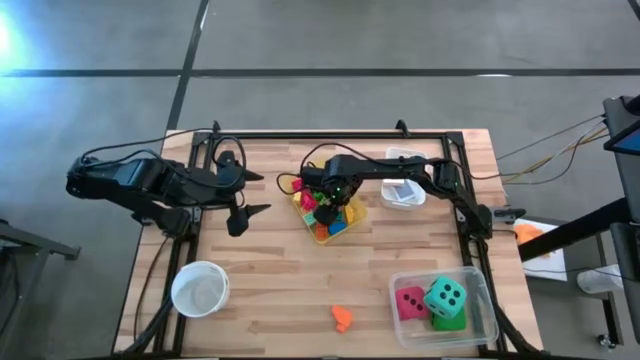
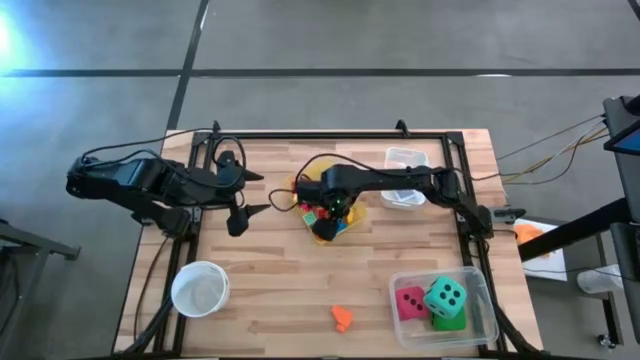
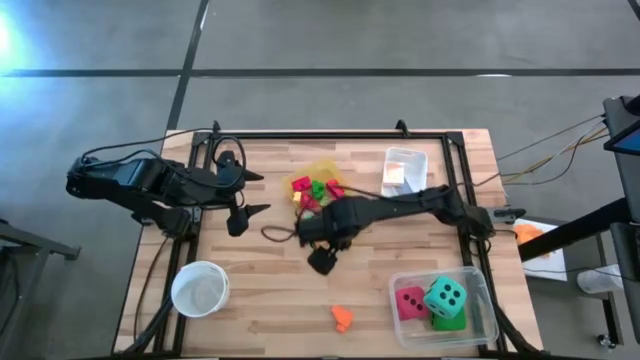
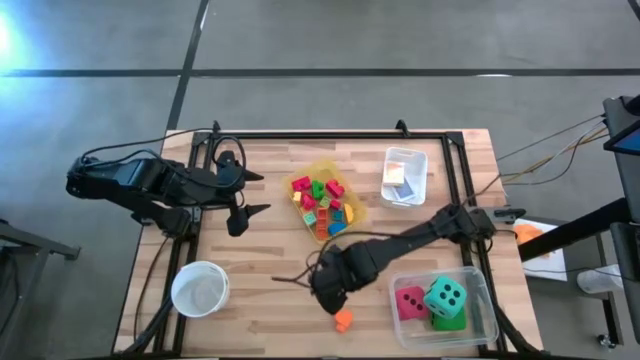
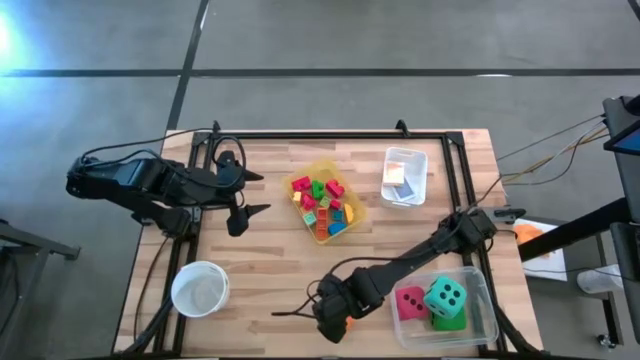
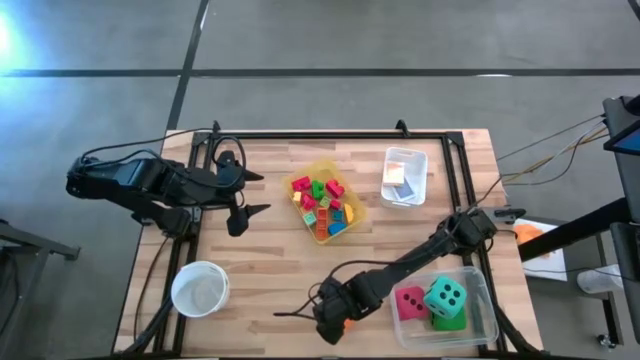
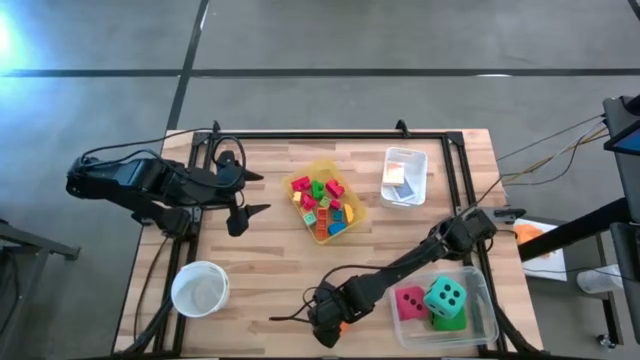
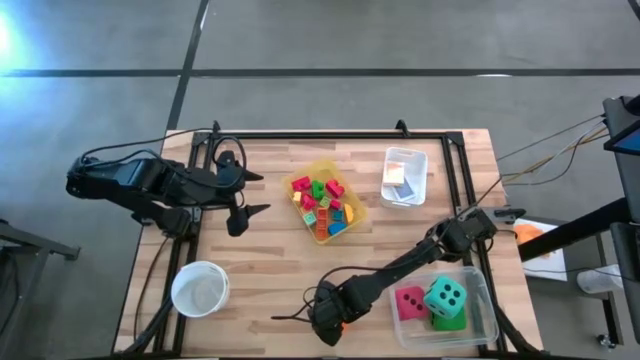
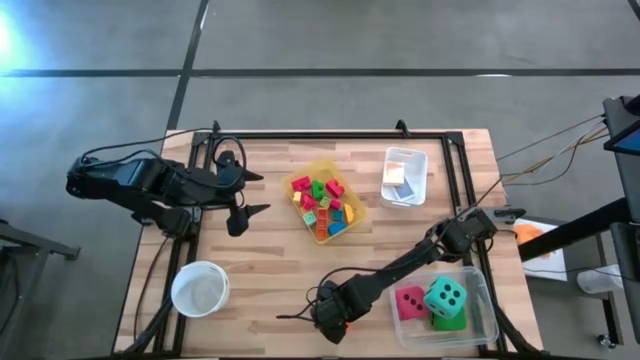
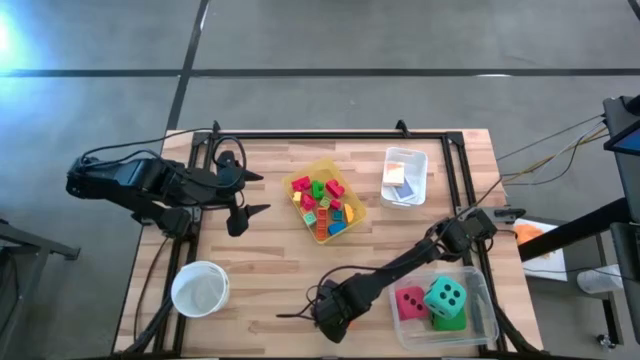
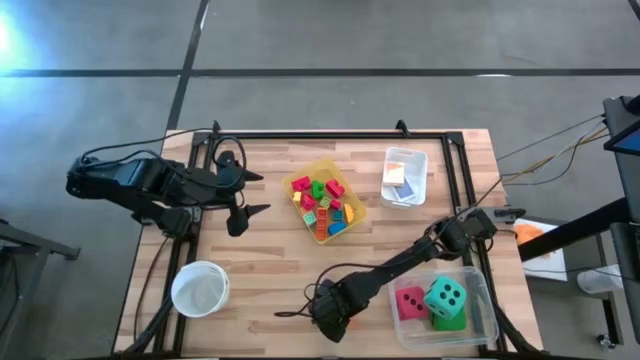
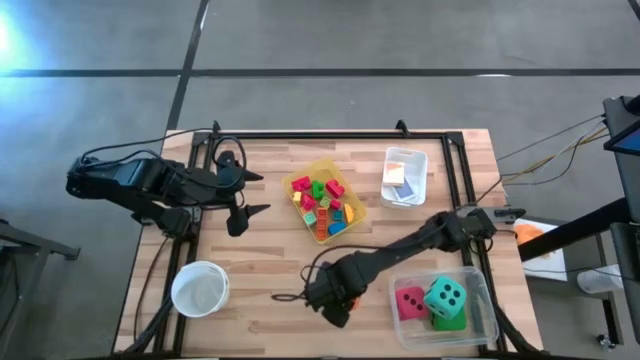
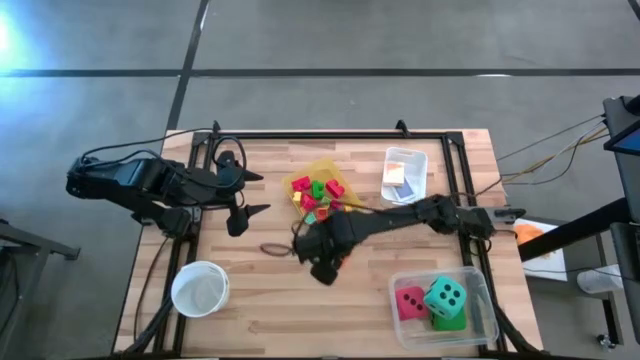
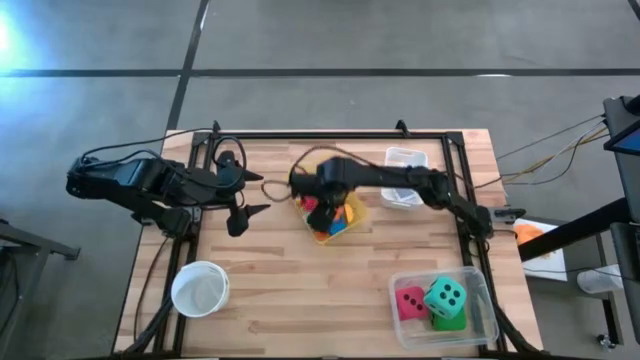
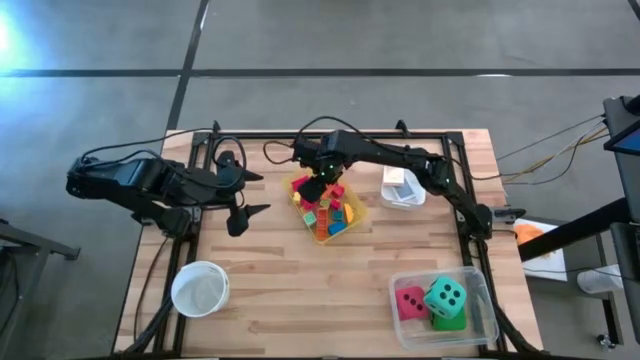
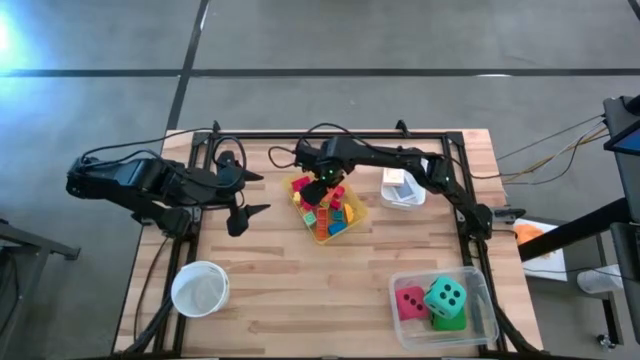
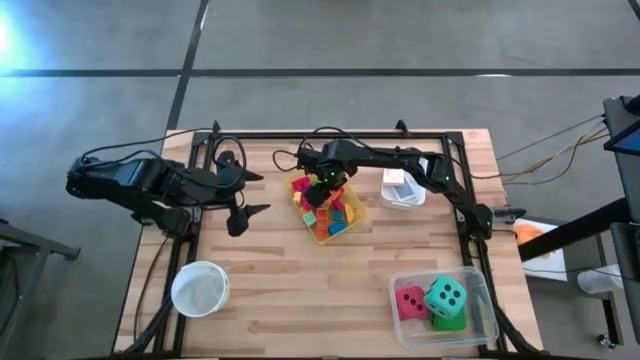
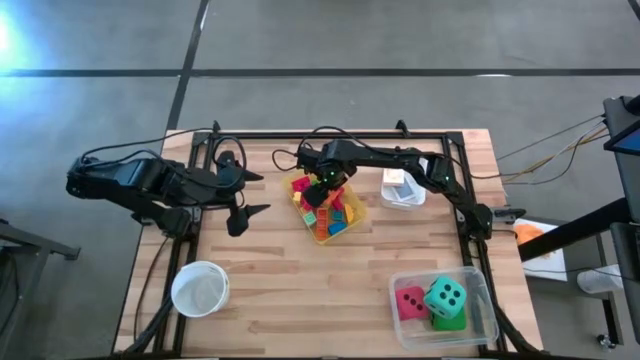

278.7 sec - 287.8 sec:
Task: Pick & Place Toys
Put the orange game piece into the yellow bin

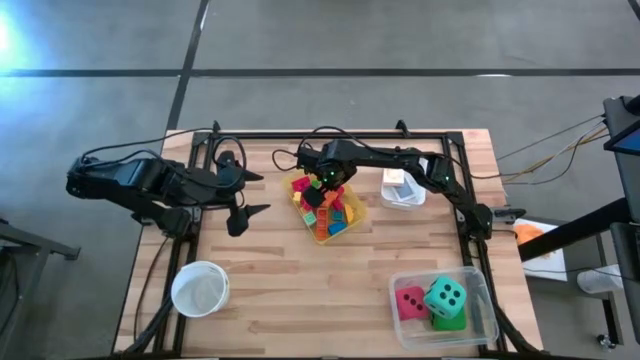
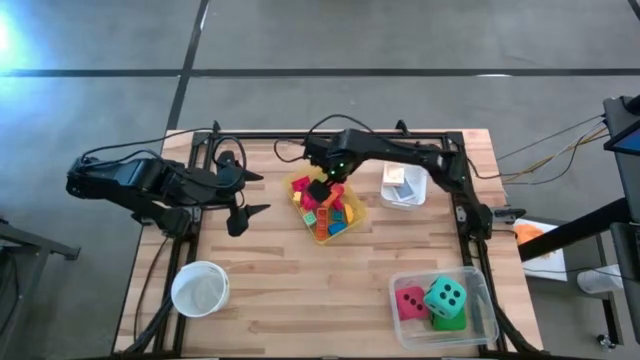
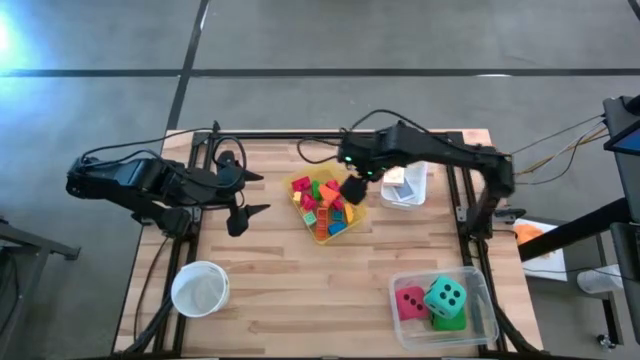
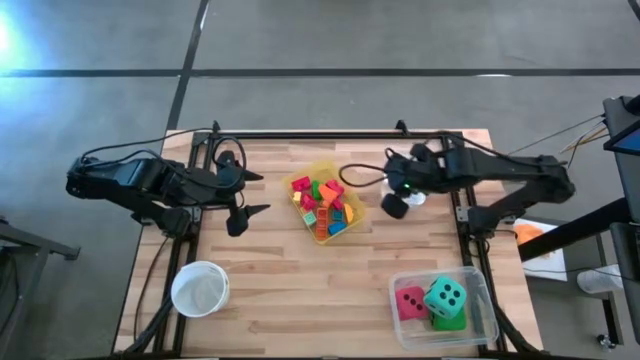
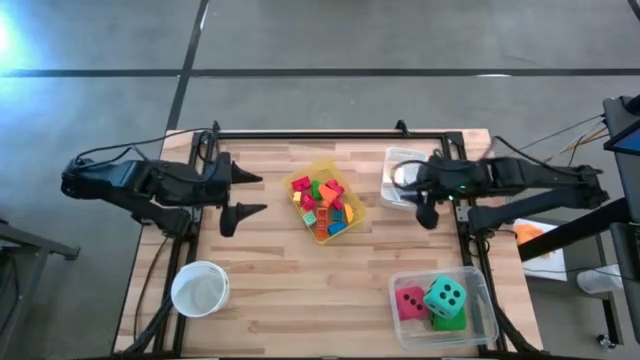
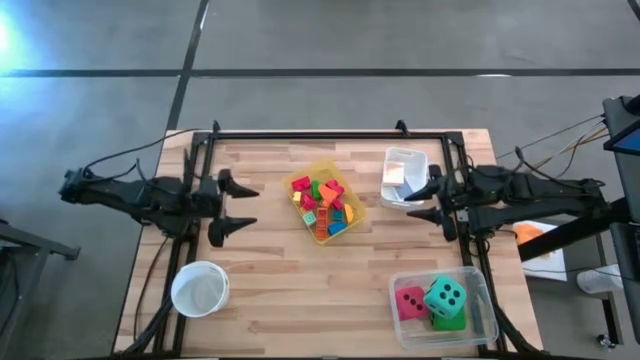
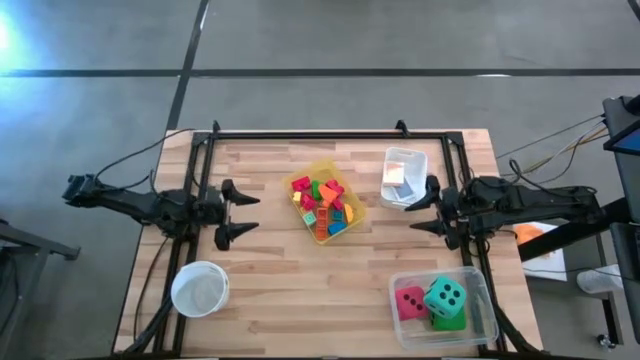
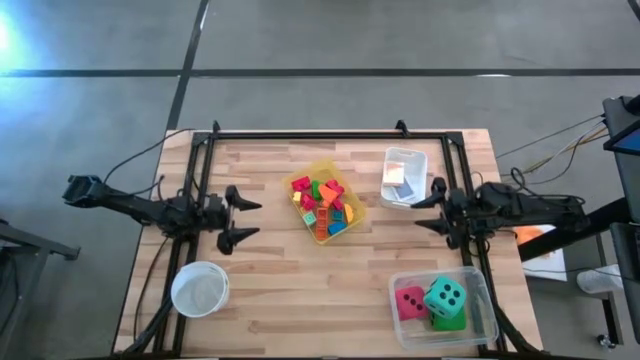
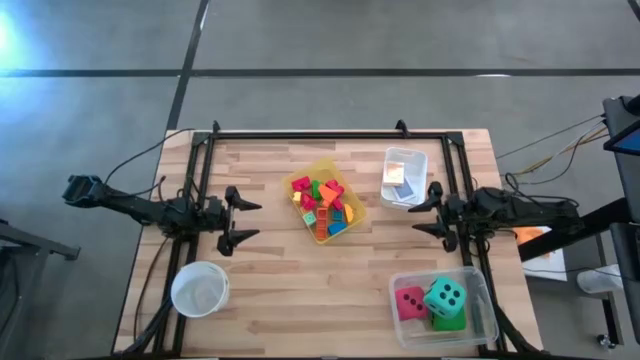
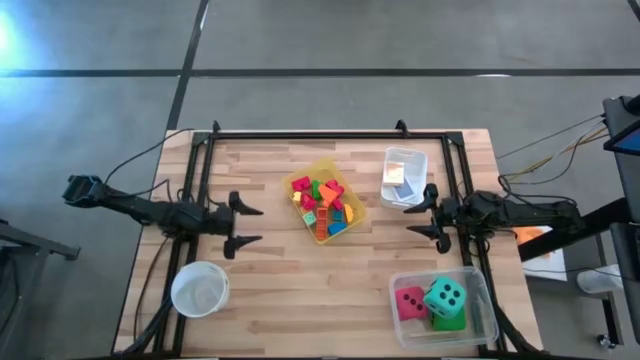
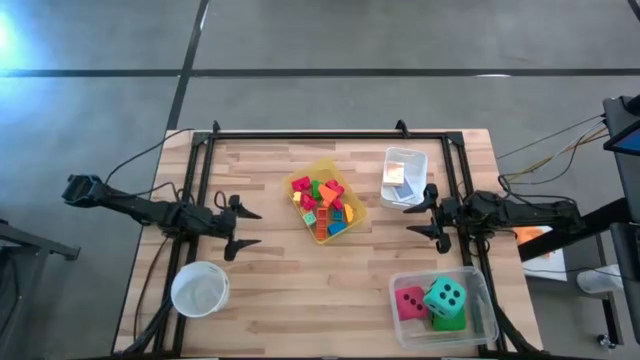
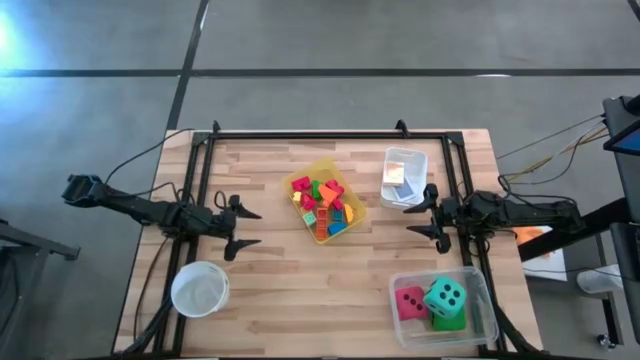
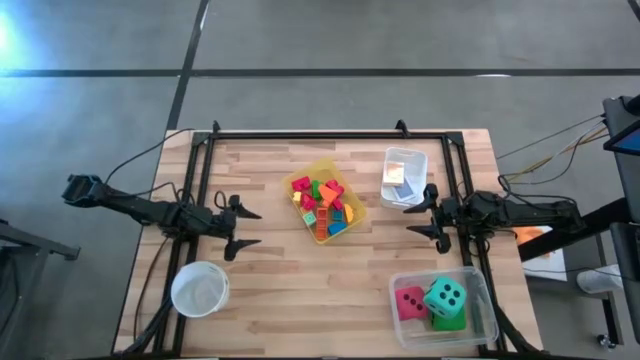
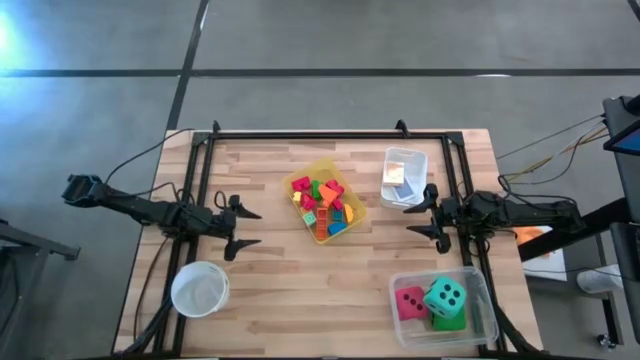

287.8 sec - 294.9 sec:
Return to Home Position

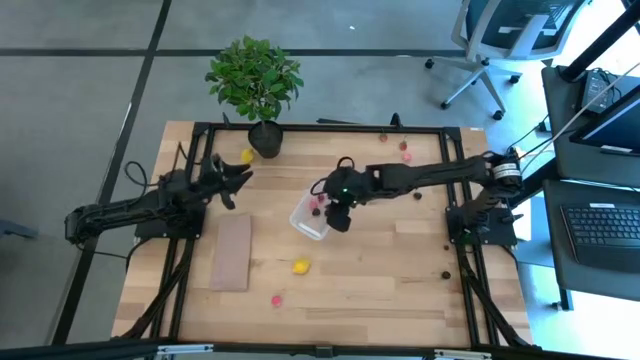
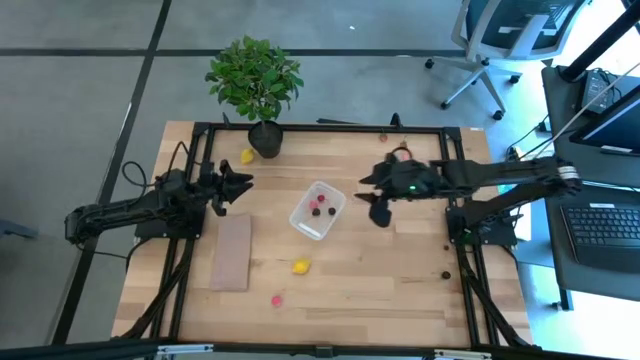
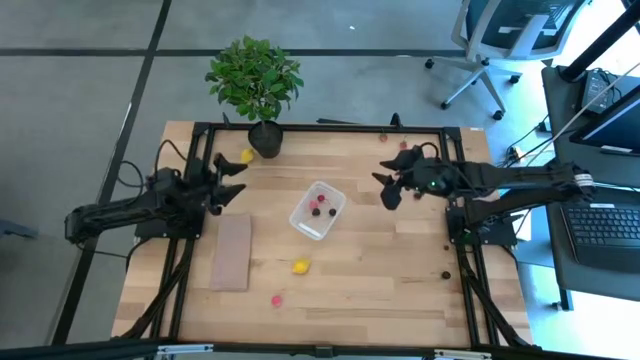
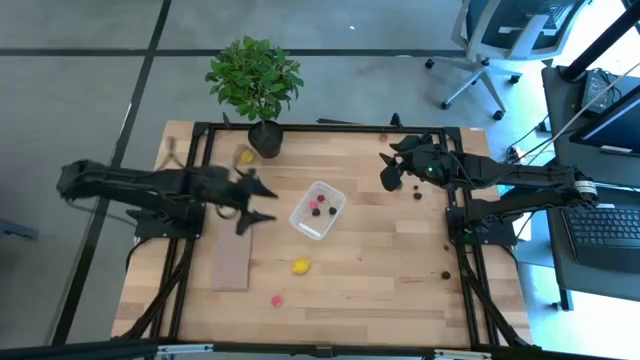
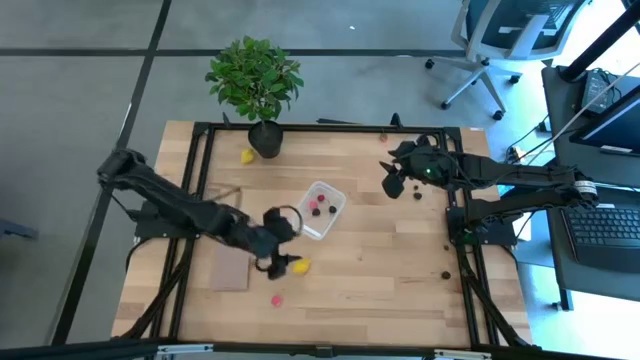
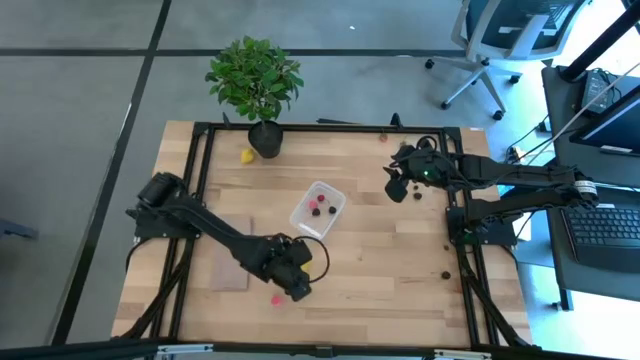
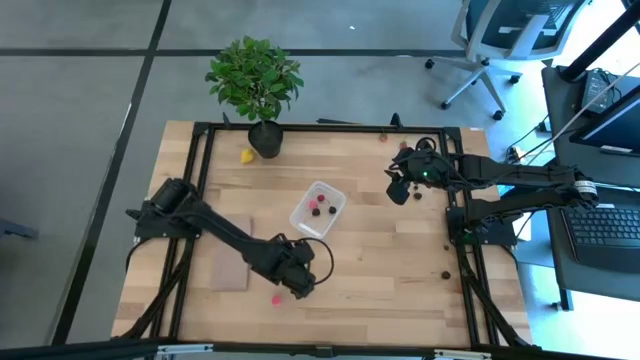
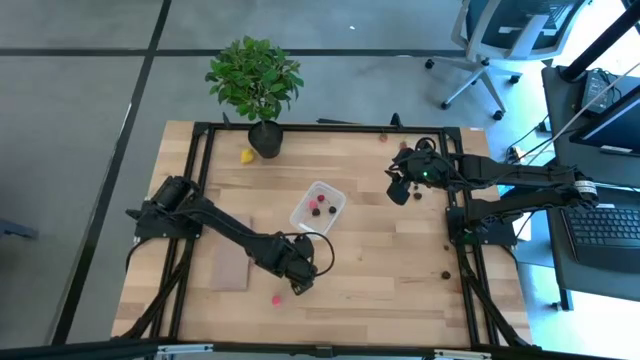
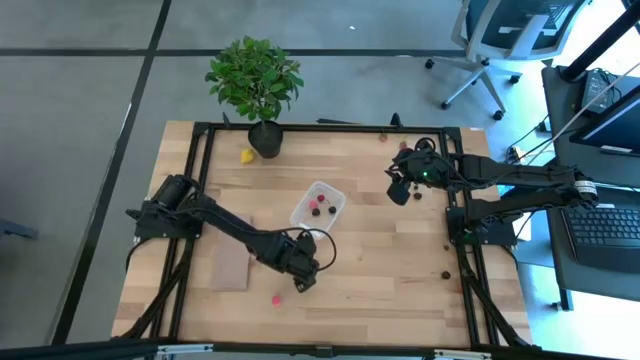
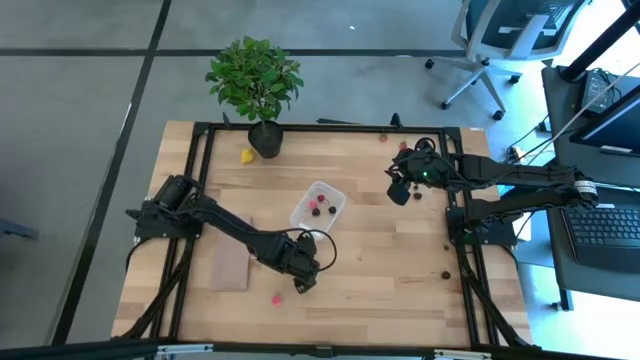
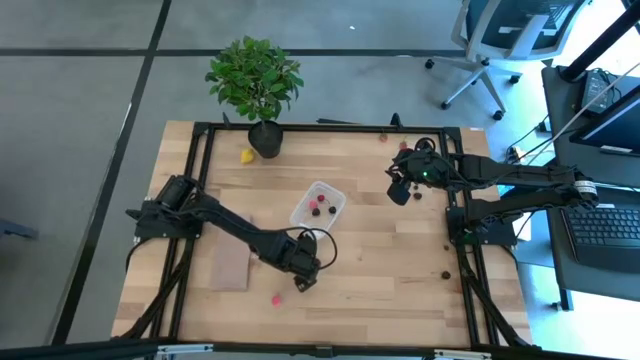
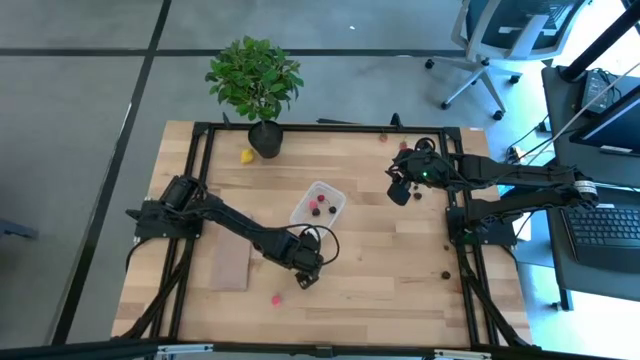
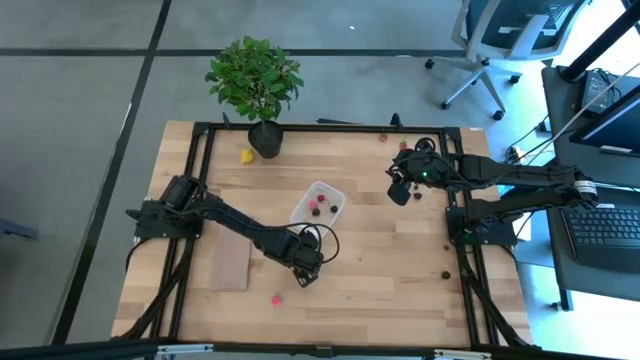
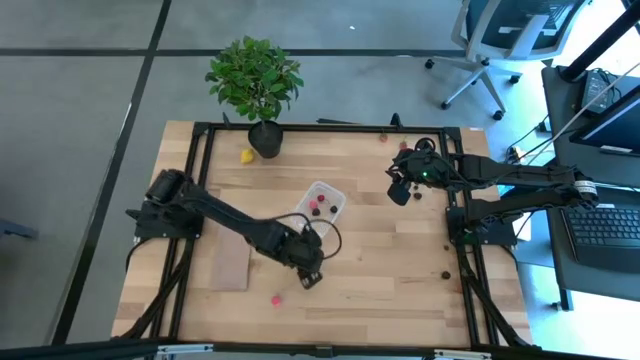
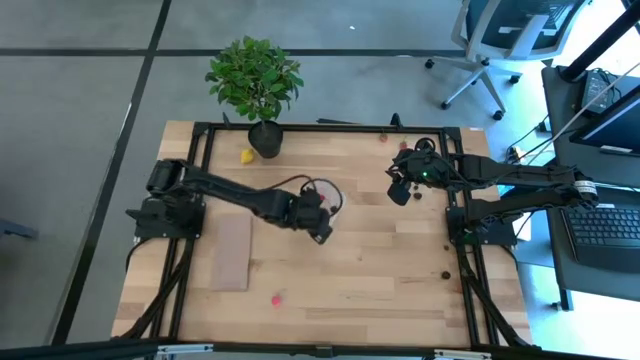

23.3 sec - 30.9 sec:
Task: Pick and placing Produce into tupperware
Put the bottom lemon into the transparent bin
